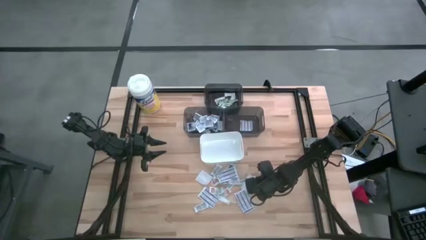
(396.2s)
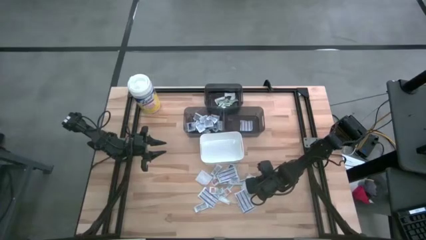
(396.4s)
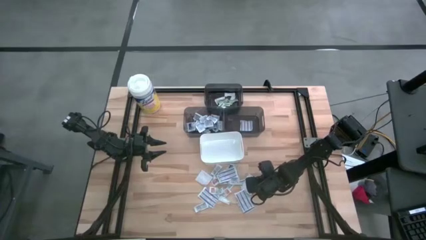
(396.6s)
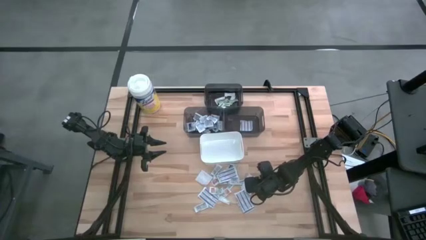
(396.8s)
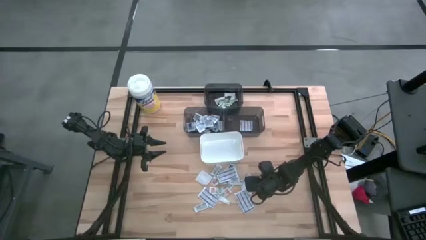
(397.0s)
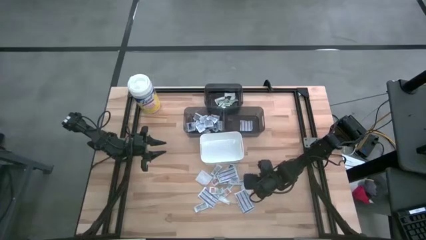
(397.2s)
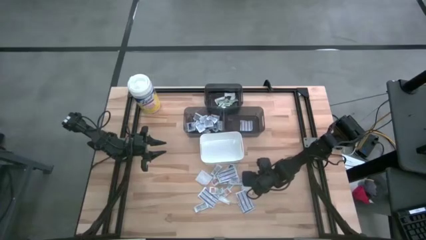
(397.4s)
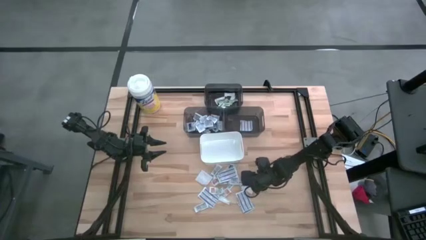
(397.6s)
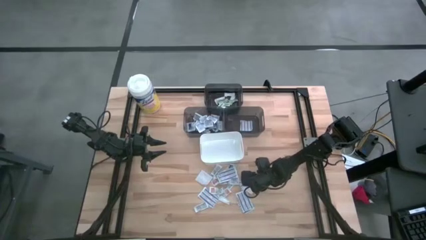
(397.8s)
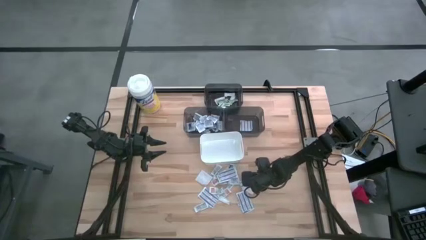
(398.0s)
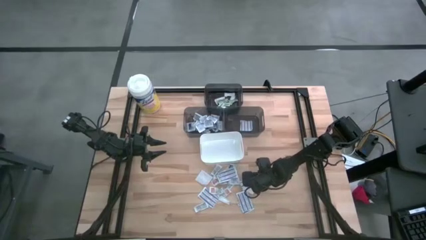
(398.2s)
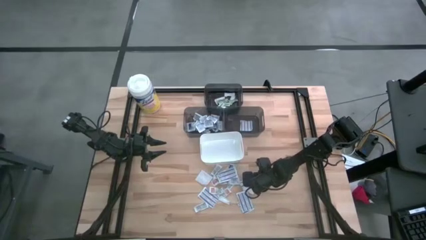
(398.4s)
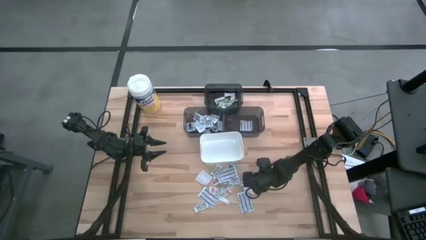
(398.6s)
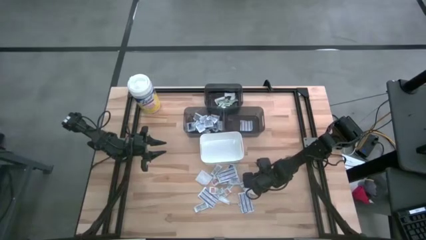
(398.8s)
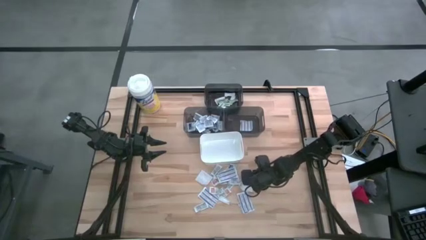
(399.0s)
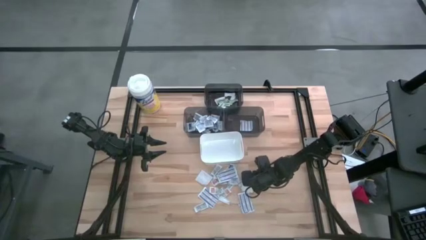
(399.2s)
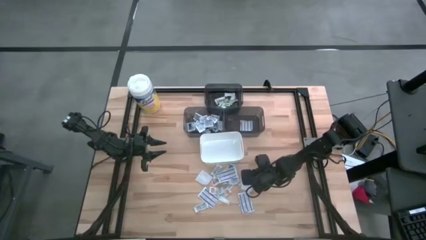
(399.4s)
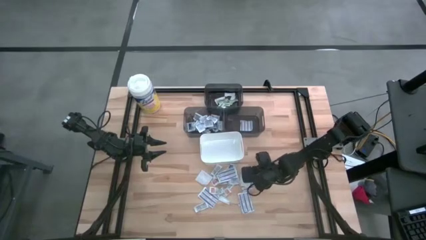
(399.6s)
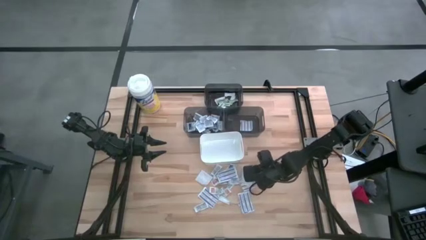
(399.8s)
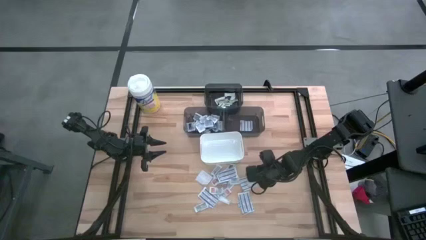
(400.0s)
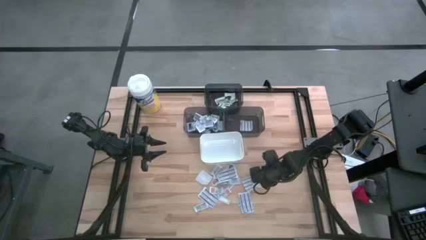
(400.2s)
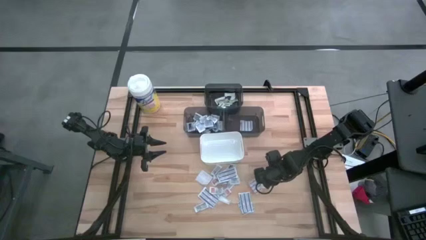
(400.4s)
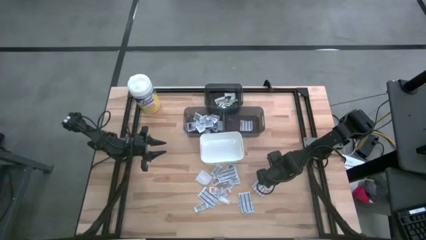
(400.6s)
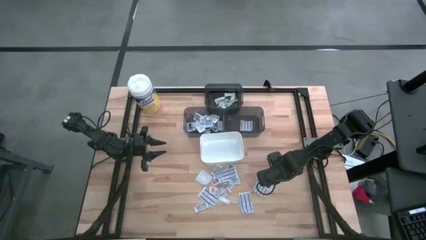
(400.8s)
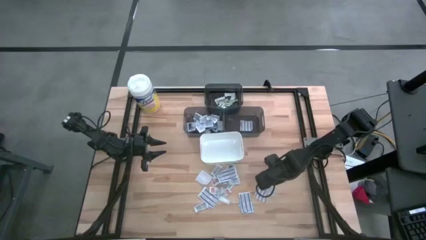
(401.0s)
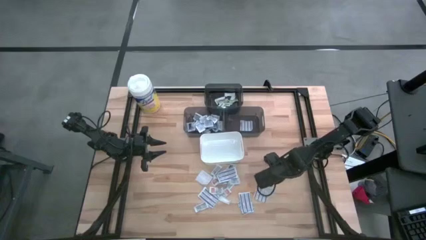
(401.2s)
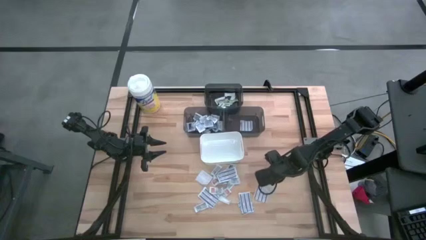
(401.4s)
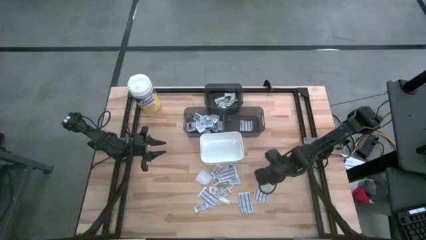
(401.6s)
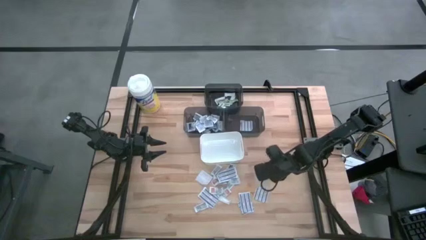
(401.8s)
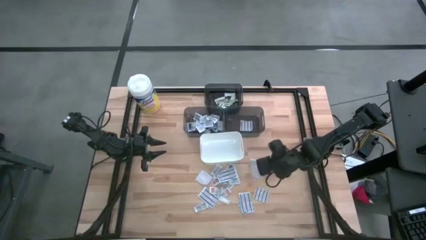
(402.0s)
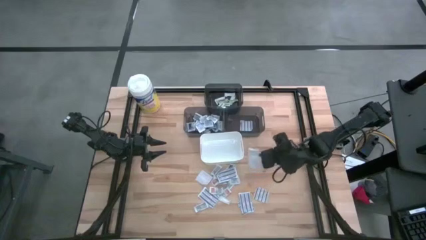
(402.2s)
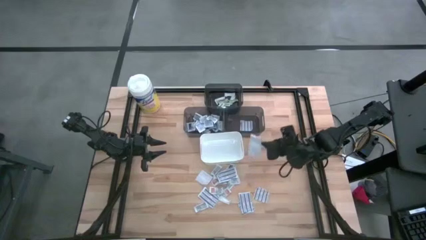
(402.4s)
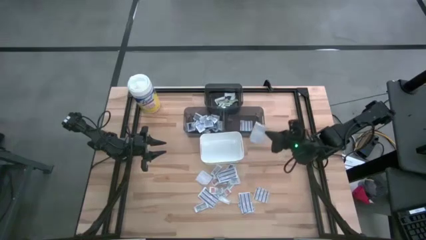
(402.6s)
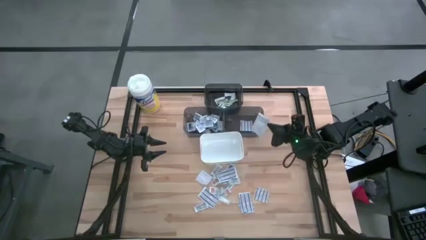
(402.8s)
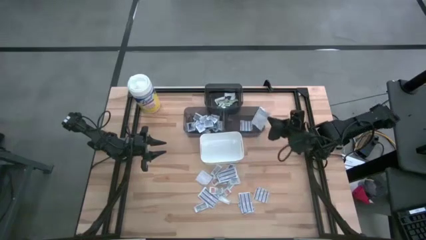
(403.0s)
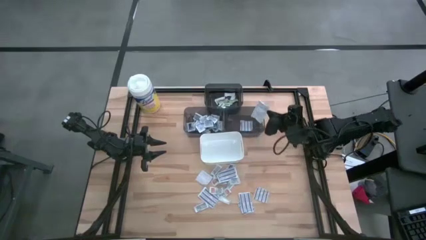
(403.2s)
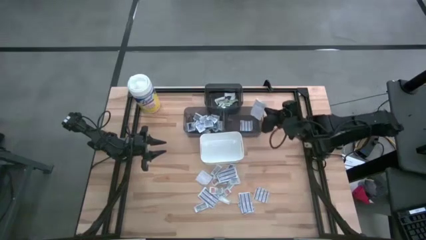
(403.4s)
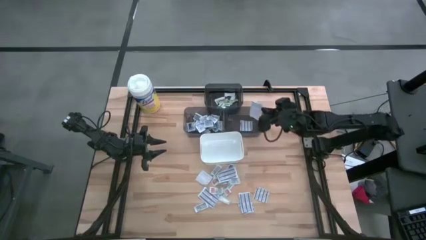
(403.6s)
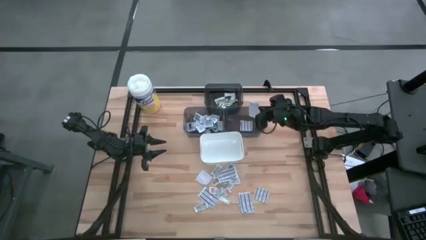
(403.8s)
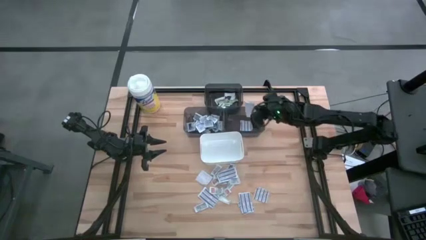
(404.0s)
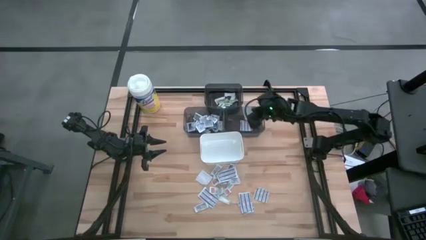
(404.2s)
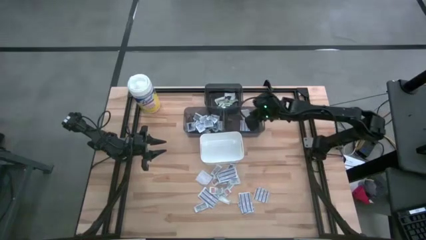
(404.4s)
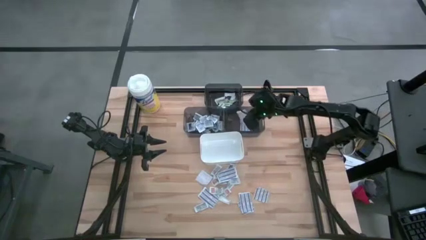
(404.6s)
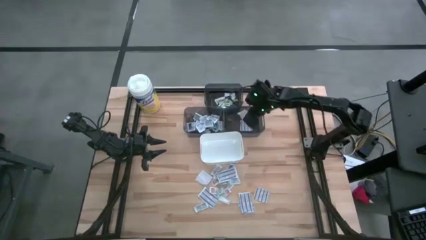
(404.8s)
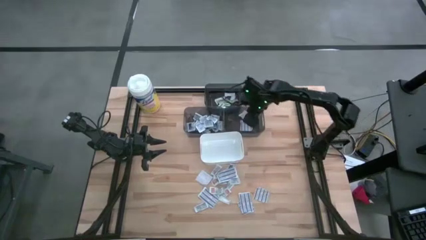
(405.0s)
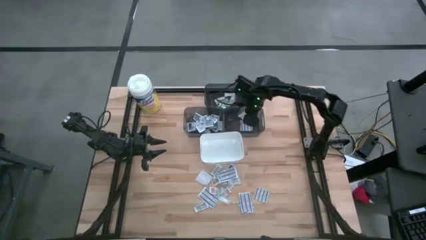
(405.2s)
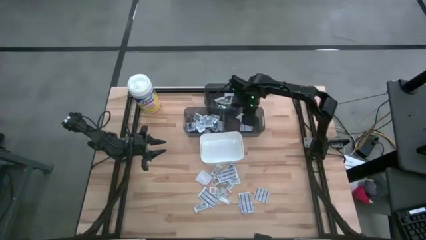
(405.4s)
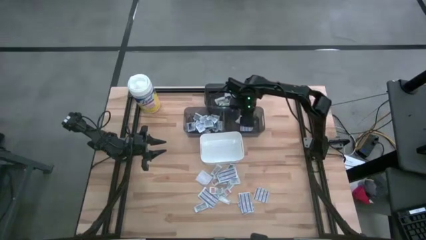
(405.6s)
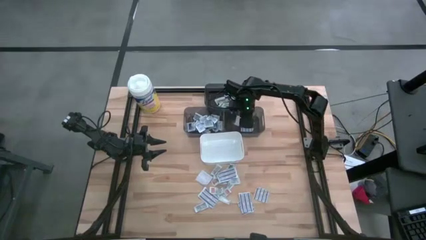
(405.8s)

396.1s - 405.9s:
Task: Pick & Place First Aid Supplies
Put the blue bandage into the right black bin

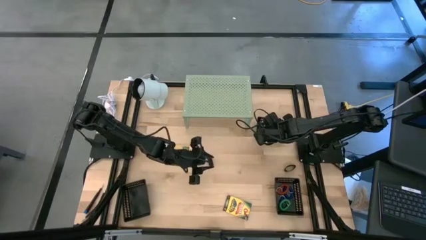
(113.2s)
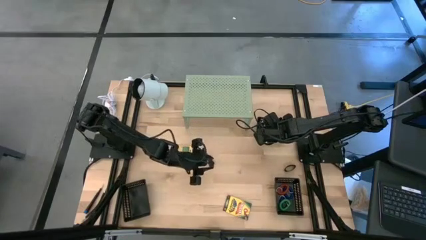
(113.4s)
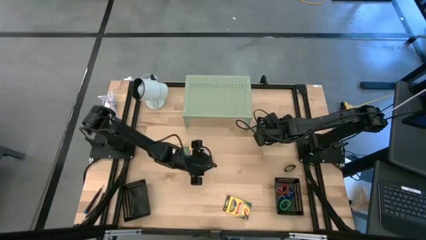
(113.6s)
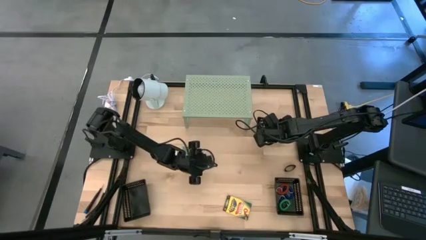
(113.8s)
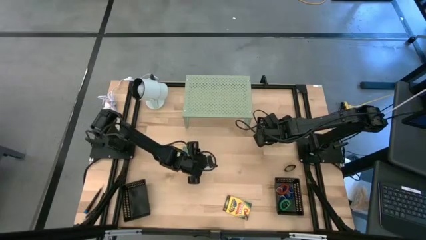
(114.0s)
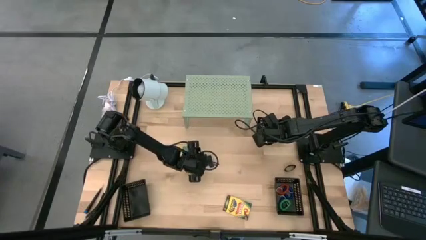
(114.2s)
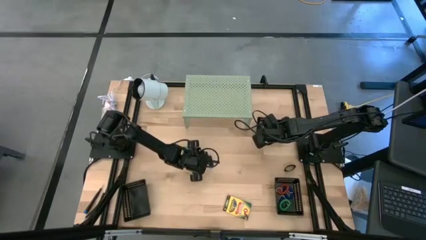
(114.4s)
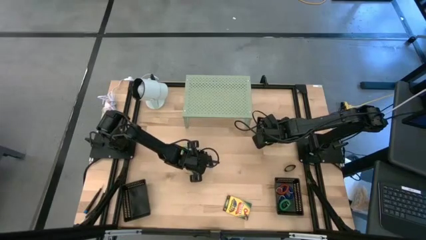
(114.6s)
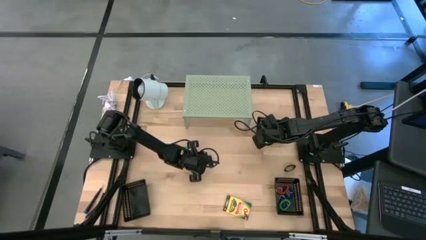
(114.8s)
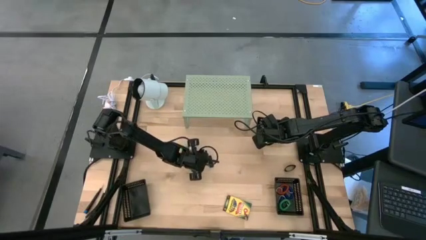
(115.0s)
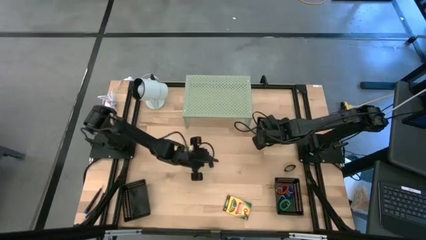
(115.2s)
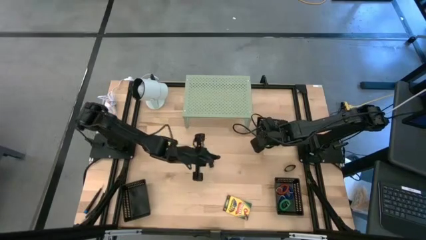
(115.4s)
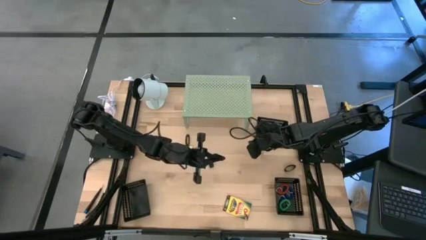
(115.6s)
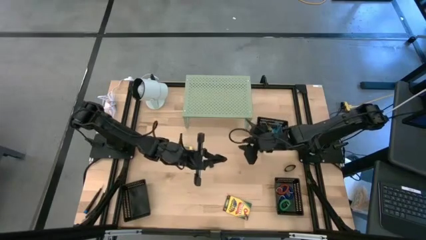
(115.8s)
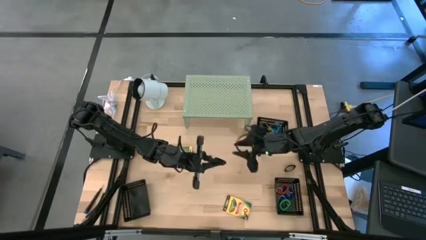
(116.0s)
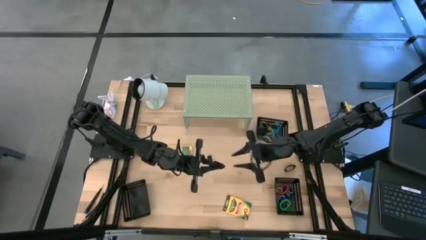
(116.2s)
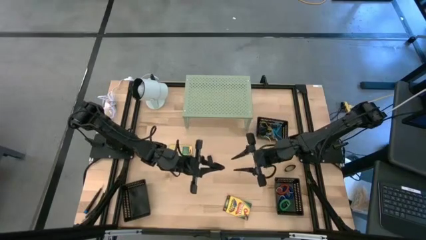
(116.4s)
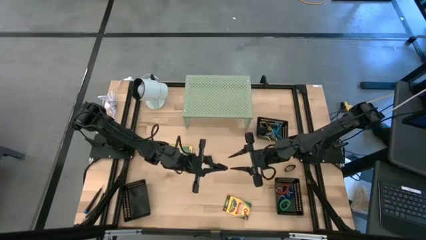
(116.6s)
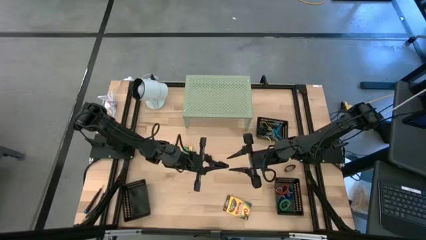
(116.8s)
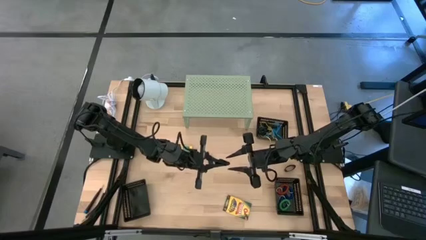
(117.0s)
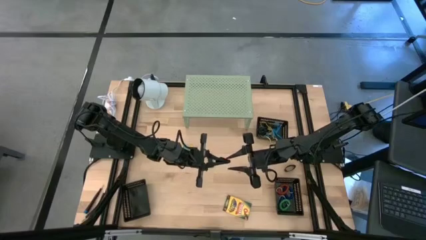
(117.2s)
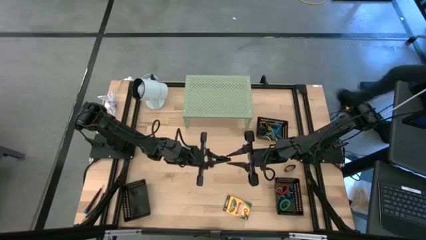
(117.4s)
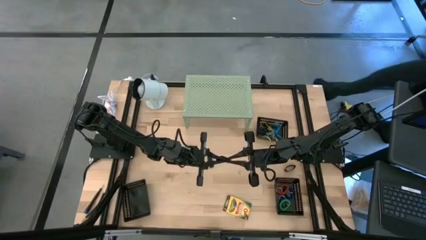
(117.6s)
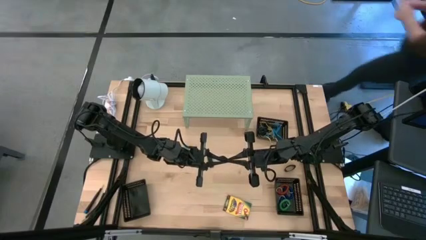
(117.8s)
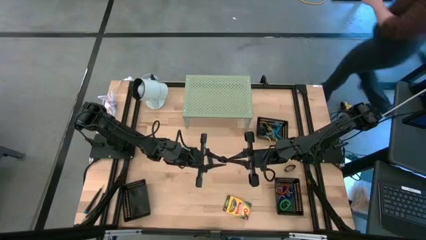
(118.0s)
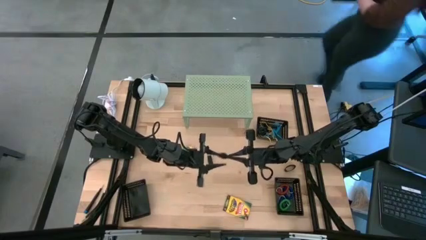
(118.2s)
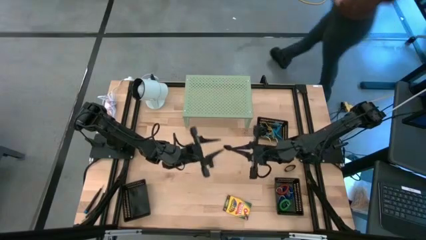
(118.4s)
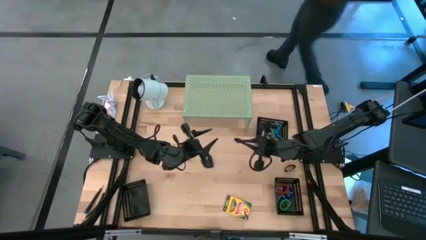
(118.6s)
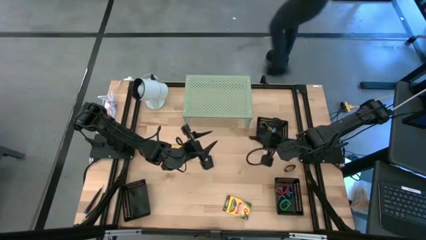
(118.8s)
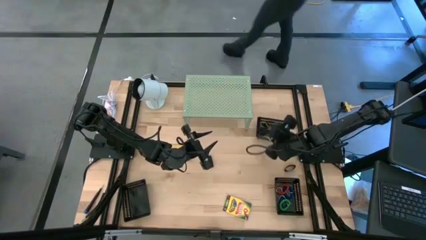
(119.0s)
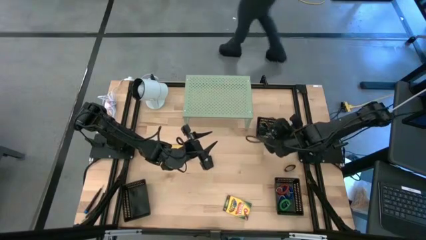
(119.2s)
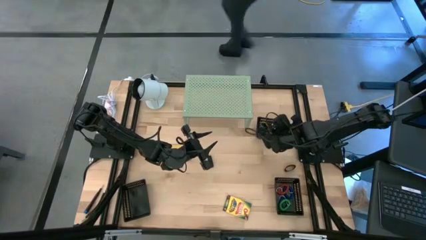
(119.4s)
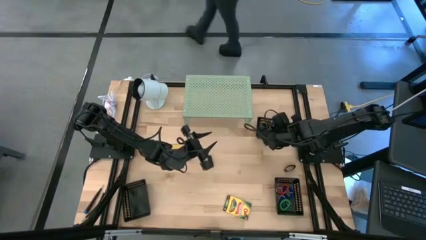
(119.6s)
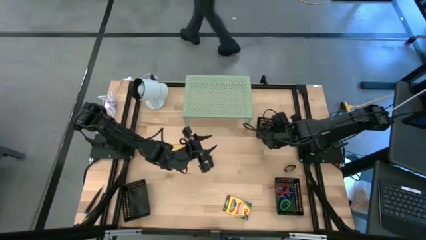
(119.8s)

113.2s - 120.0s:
Task: Pick & Place Office Desk Supplies
Put the black rubber band into the top right black bin
